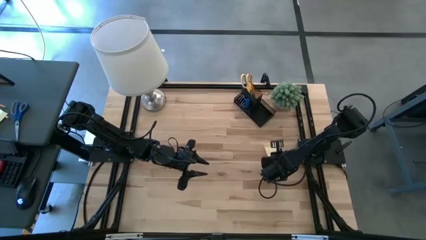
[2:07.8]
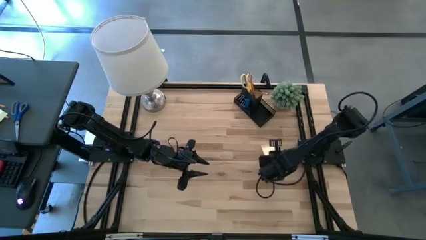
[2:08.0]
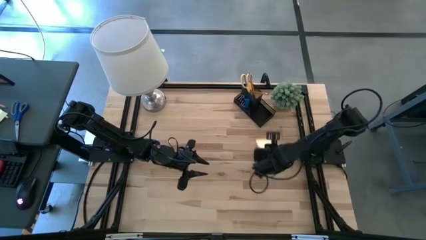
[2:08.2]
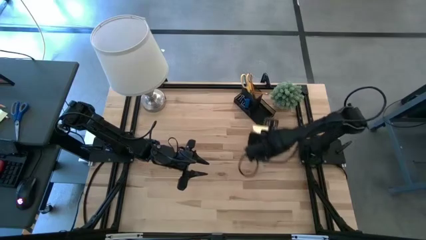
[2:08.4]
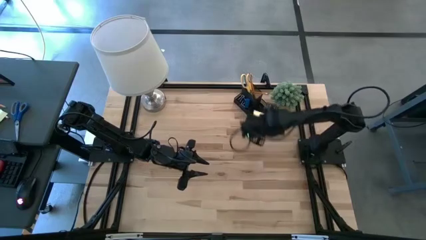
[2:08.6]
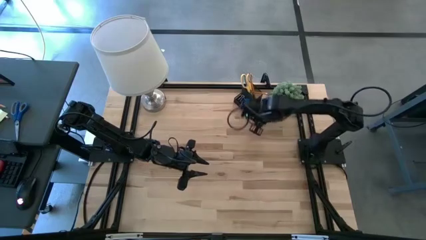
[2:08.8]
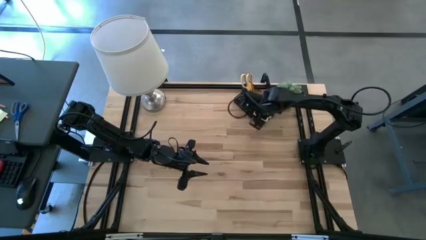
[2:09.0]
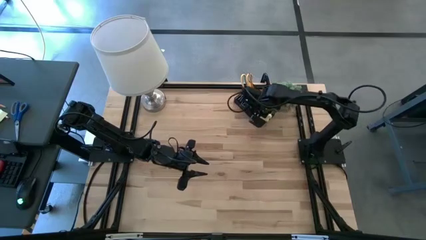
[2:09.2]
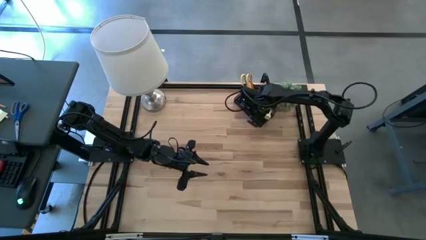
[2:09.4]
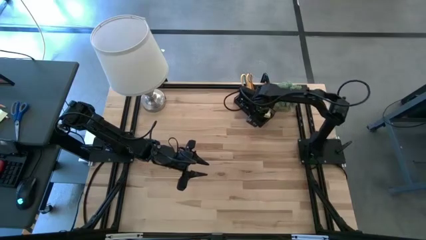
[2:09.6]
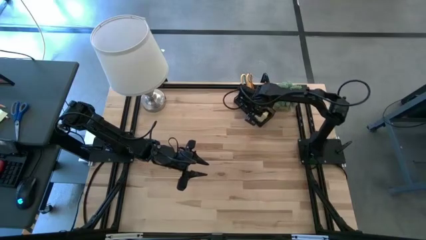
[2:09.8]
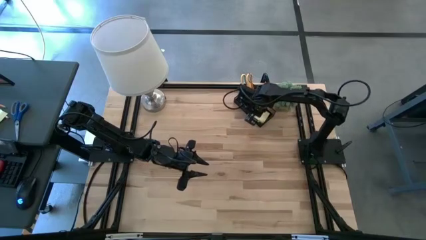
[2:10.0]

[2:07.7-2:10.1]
Task: Pick and place office supplies into organizer
Put the yellow sticky note into the desk organizer

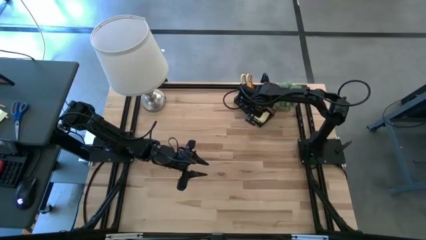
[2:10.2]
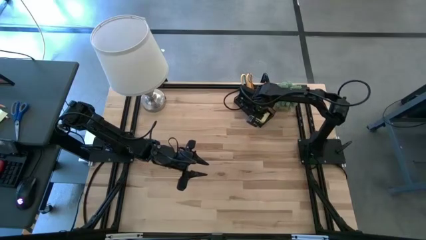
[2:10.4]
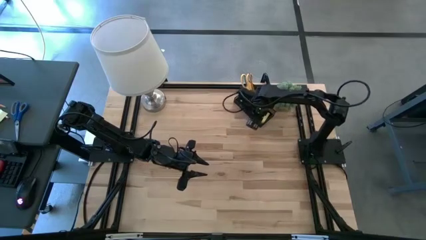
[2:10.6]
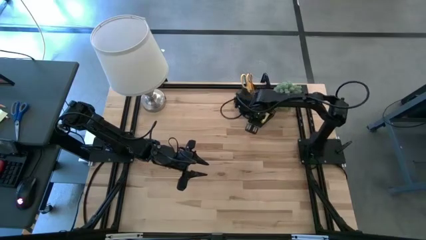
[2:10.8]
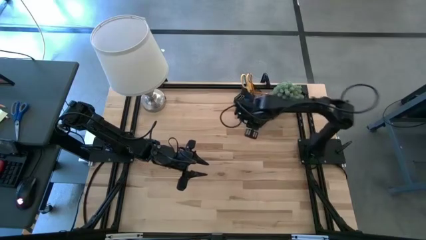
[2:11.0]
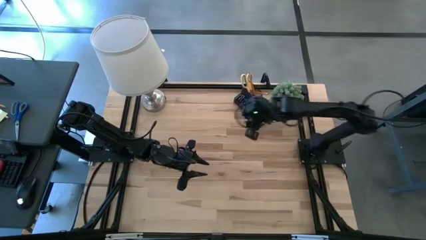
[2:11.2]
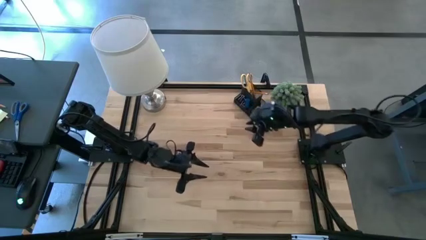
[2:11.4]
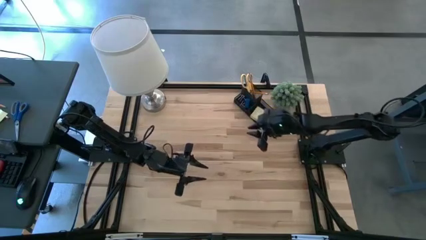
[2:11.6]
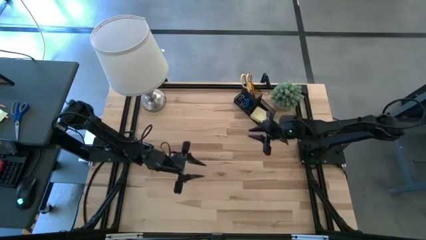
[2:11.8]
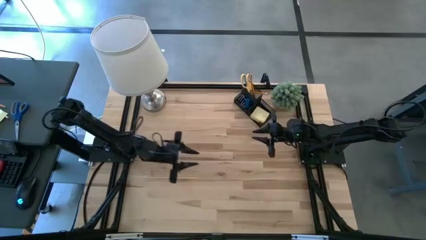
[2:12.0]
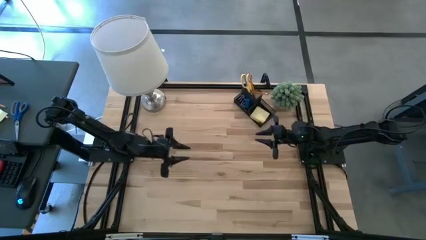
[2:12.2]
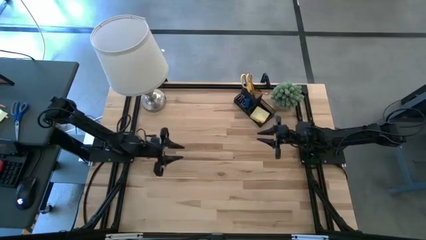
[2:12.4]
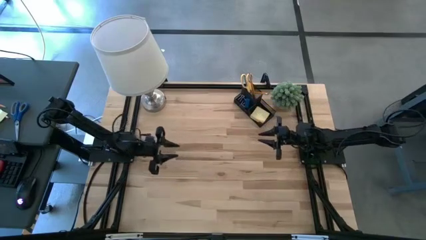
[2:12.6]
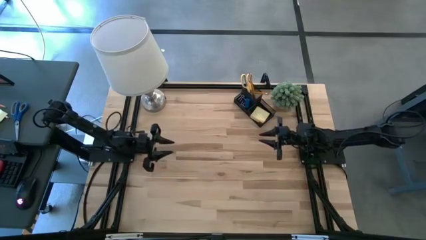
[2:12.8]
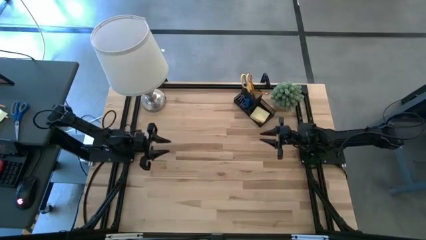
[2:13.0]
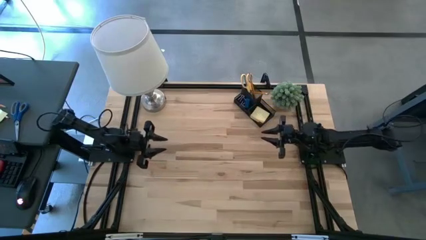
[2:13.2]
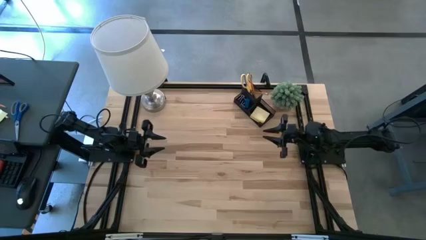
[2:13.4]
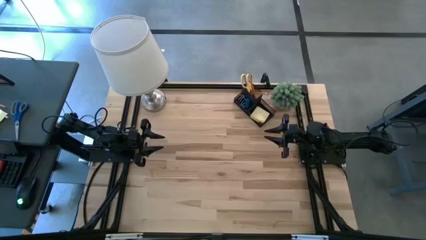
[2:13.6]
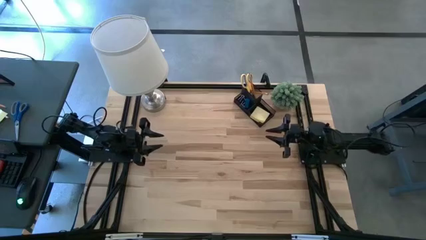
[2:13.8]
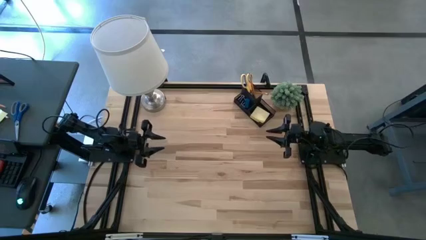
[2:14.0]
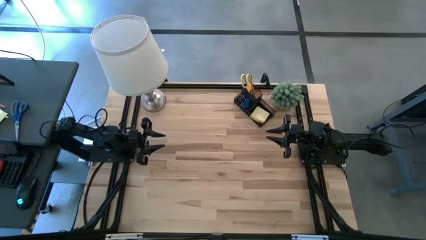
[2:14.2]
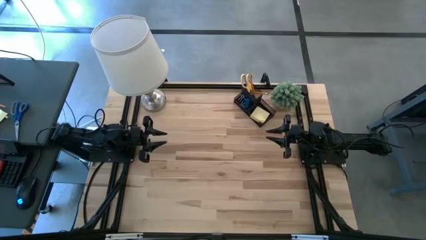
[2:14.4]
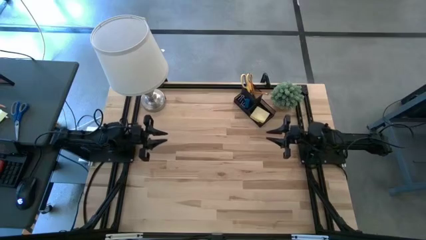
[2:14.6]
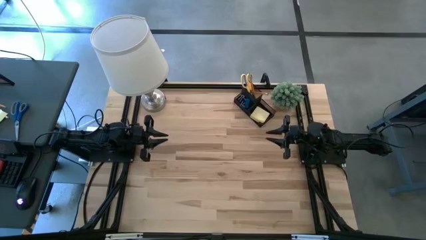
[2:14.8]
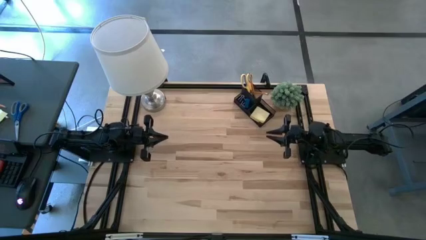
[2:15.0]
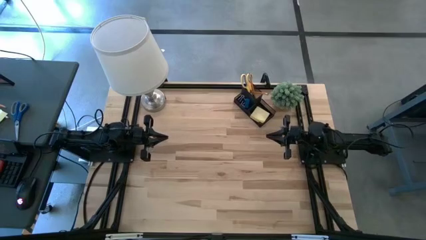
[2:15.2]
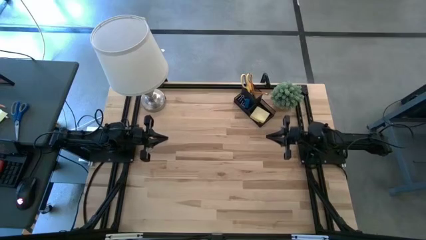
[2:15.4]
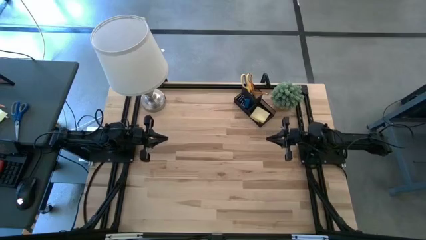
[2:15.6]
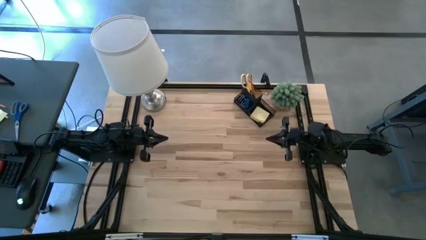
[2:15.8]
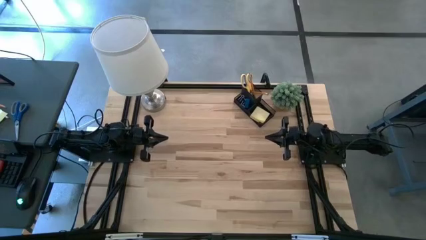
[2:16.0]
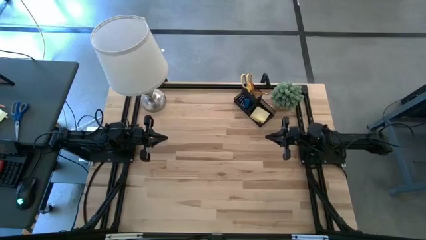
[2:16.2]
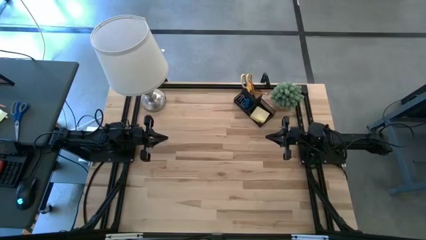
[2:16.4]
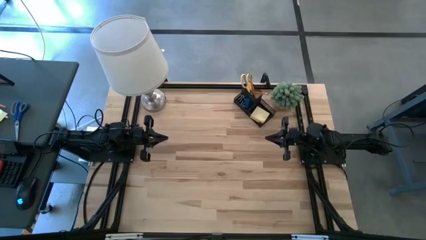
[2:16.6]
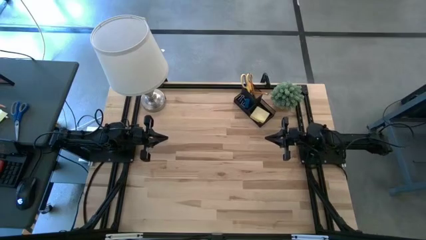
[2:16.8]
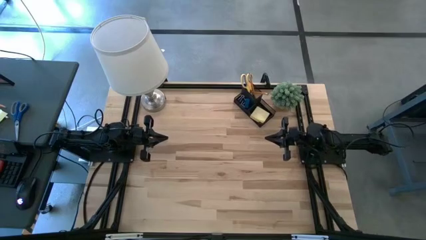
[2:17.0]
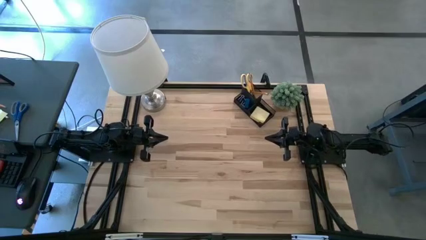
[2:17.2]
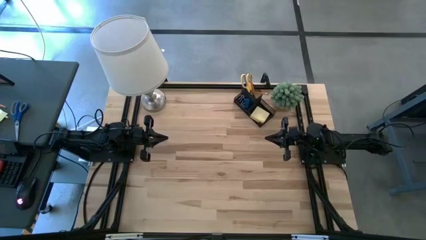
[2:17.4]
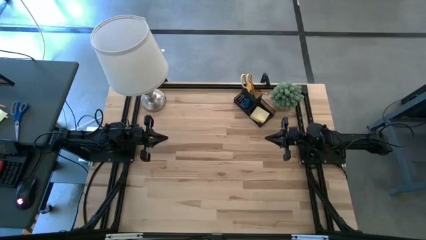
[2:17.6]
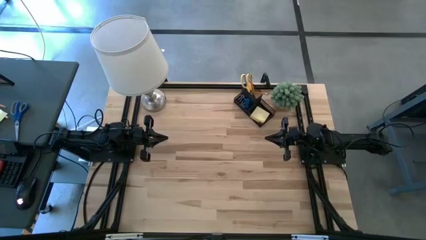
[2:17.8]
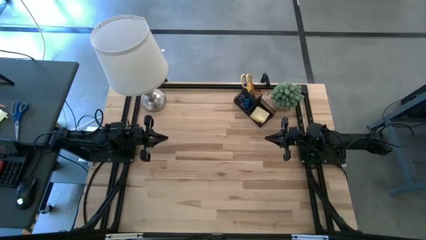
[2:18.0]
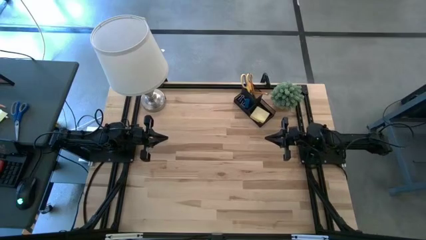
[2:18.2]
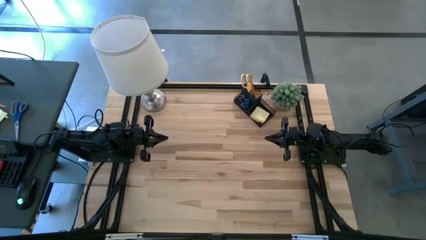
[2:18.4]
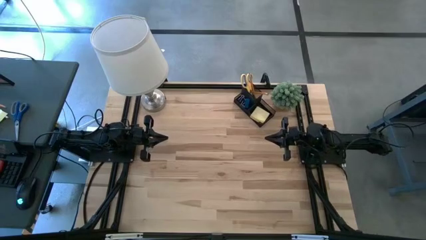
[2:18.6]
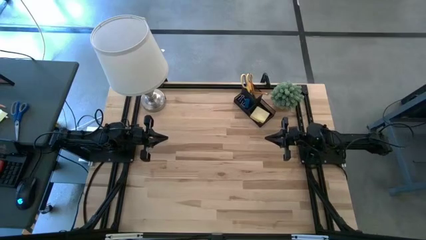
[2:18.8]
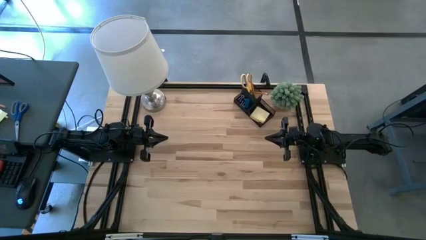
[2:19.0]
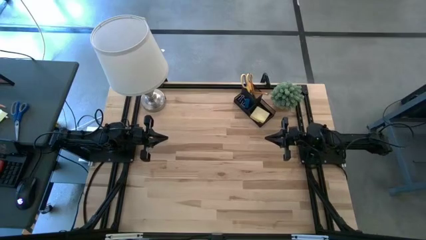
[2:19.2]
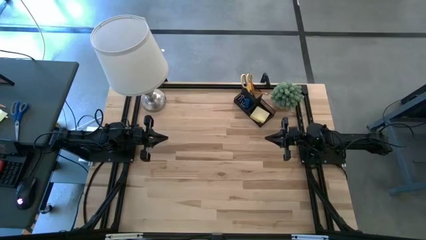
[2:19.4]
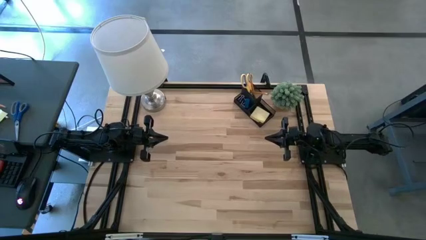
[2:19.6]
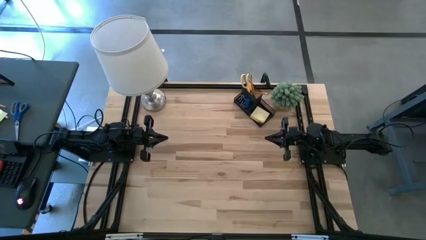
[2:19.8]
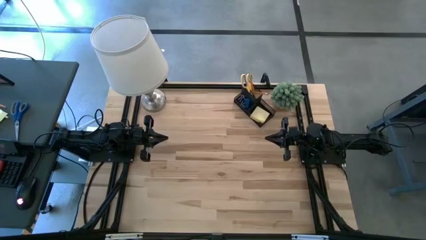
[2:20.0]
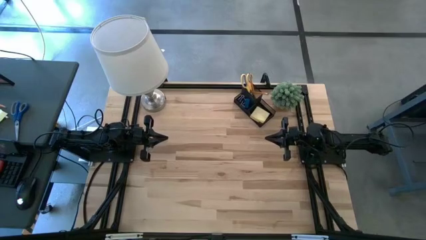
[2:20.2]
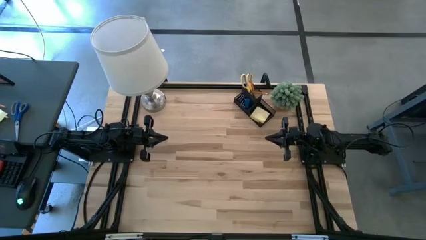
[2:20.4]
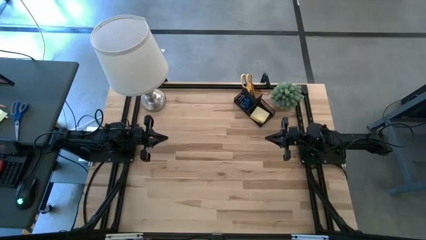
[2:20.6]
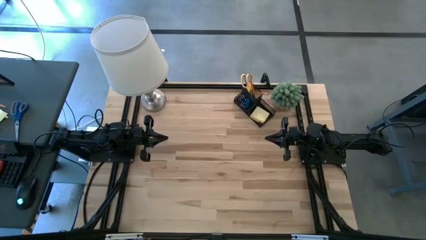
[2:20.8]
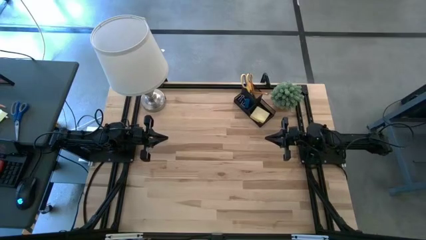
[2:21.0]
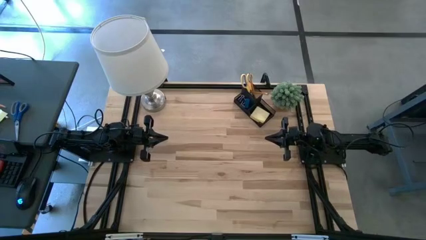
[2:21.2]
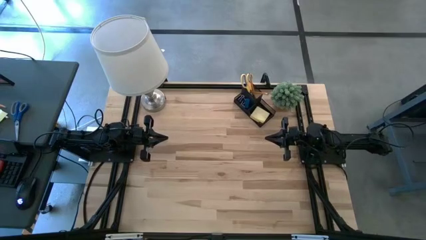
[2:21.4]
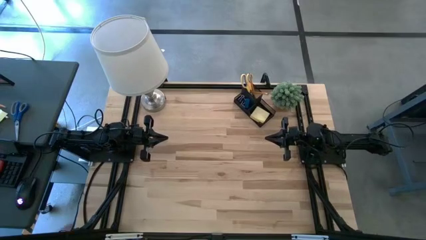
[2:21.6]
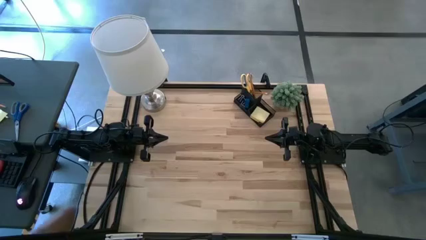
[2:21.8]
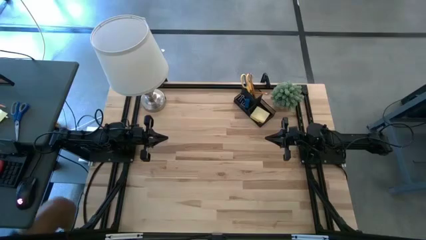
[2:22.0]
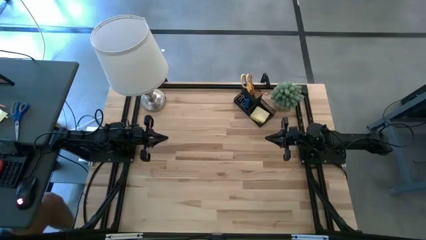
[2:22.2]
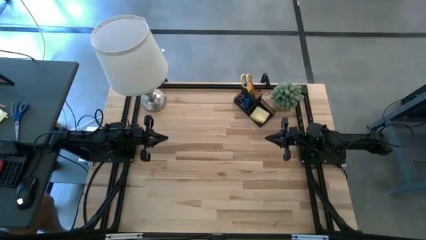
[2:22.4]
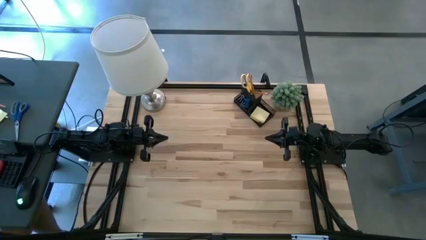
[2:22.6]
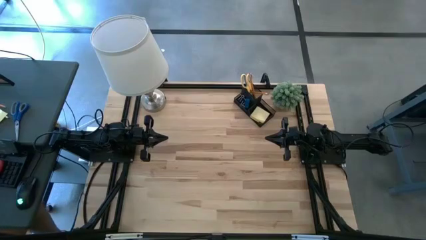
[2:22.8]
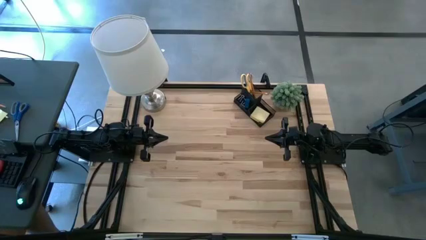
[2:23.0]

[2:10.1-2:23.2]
Return to Home Position
